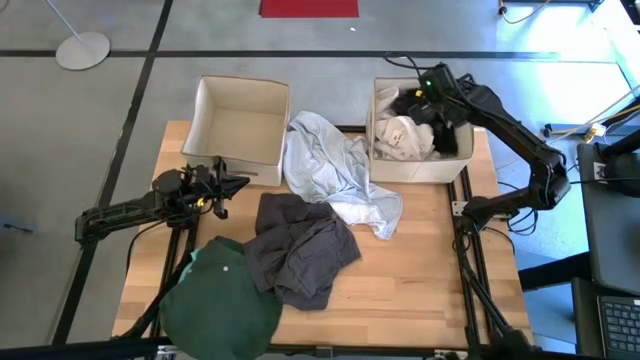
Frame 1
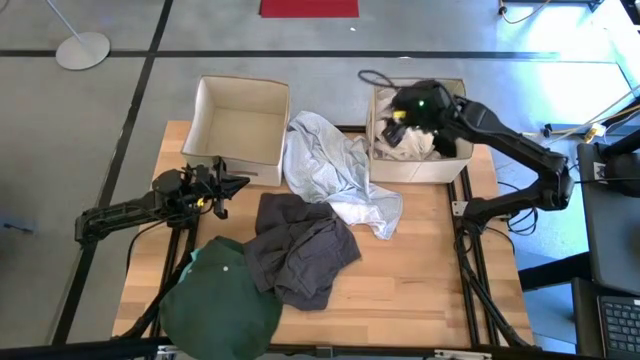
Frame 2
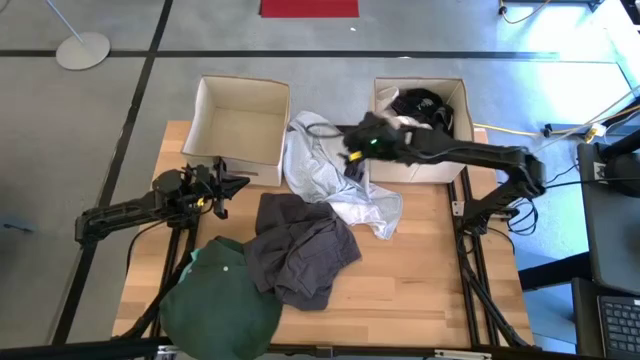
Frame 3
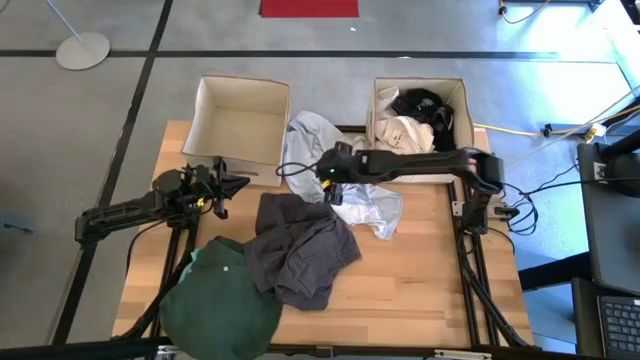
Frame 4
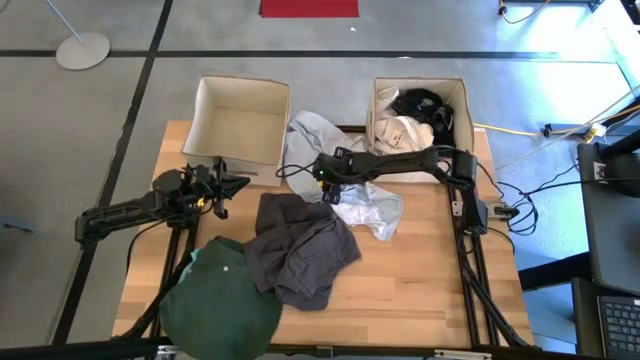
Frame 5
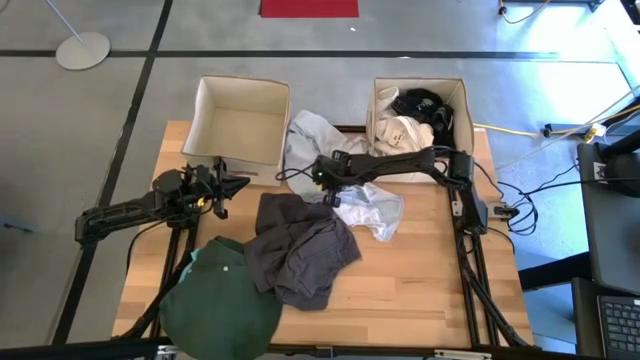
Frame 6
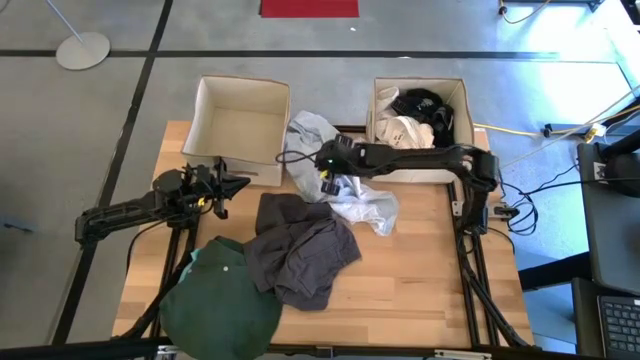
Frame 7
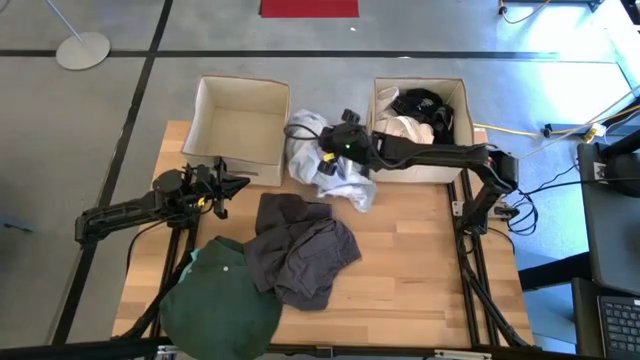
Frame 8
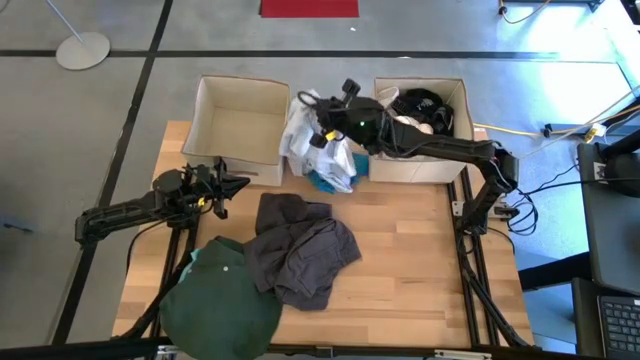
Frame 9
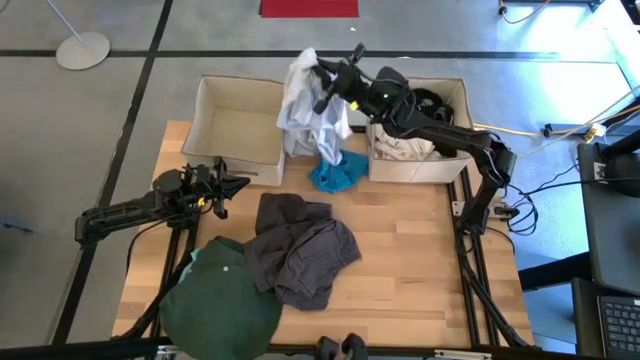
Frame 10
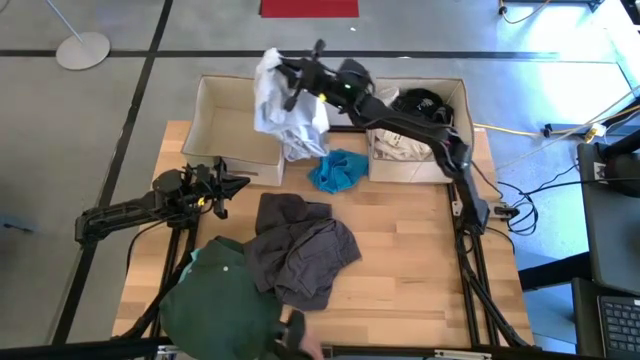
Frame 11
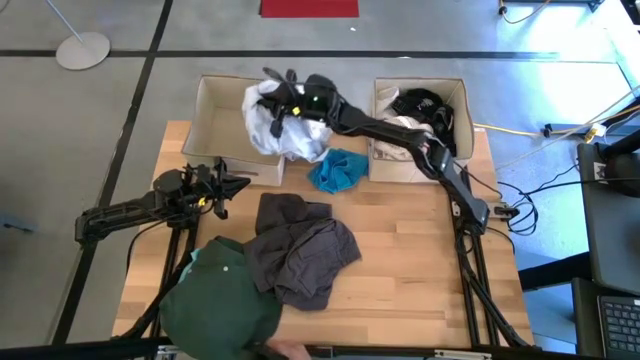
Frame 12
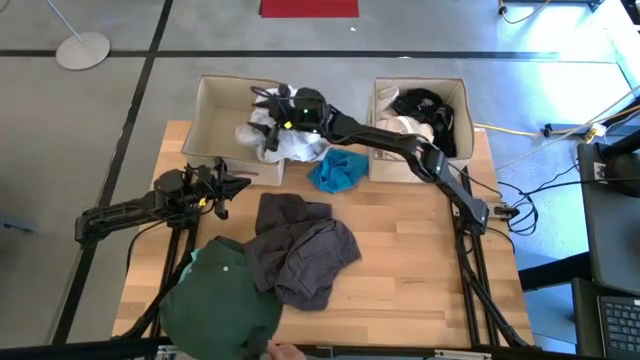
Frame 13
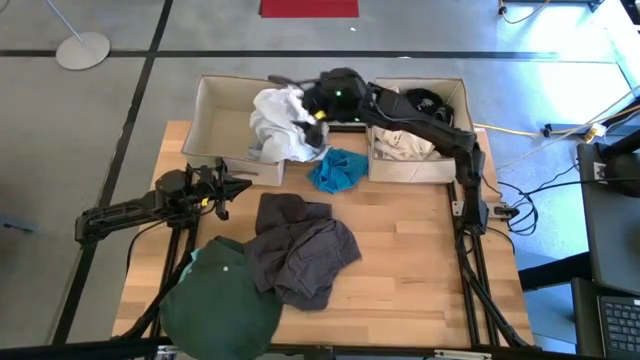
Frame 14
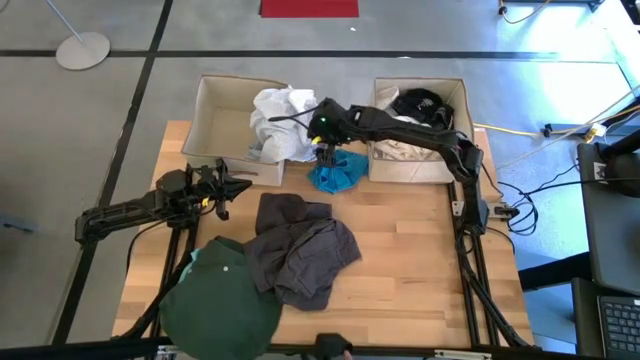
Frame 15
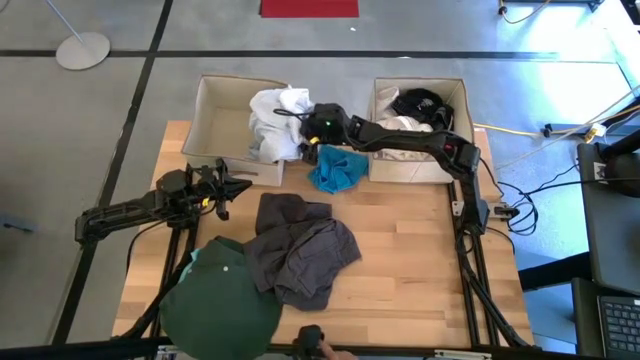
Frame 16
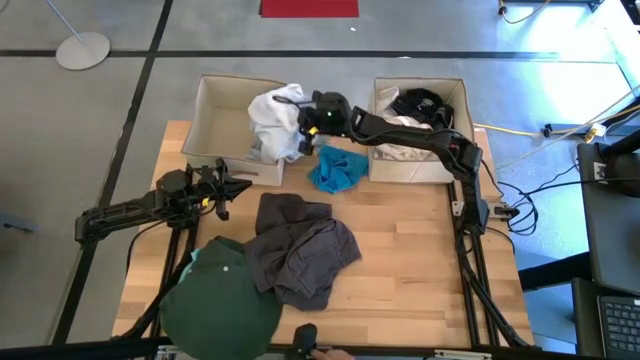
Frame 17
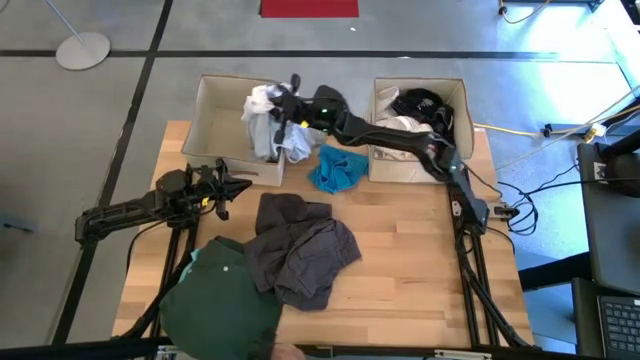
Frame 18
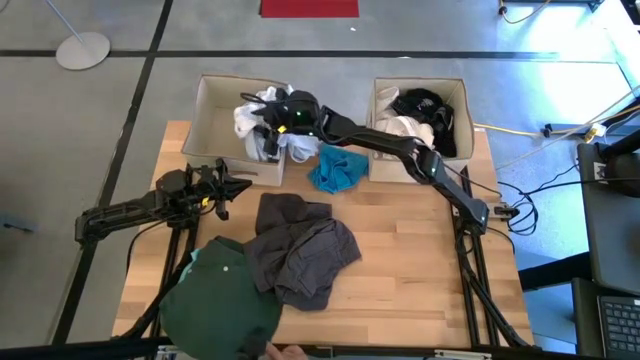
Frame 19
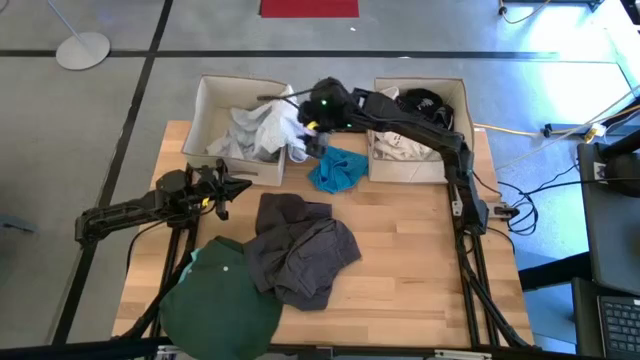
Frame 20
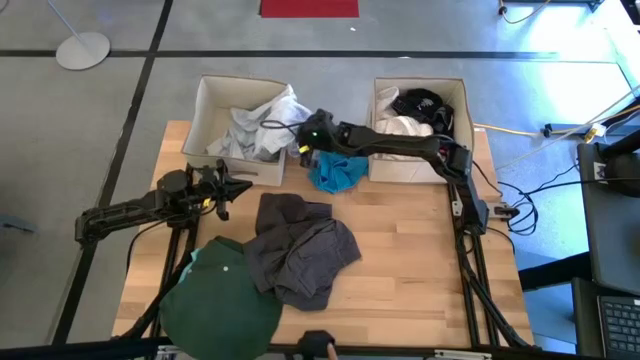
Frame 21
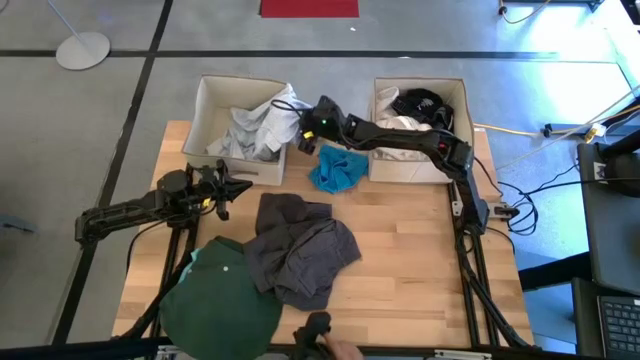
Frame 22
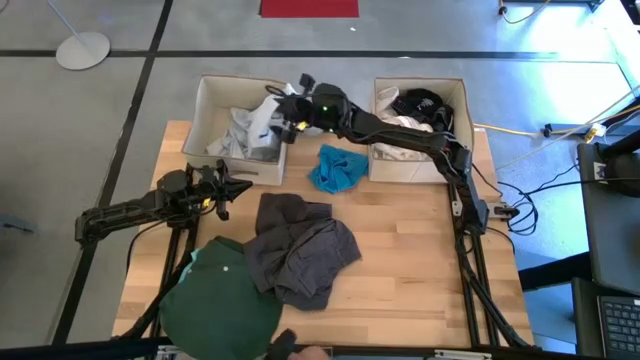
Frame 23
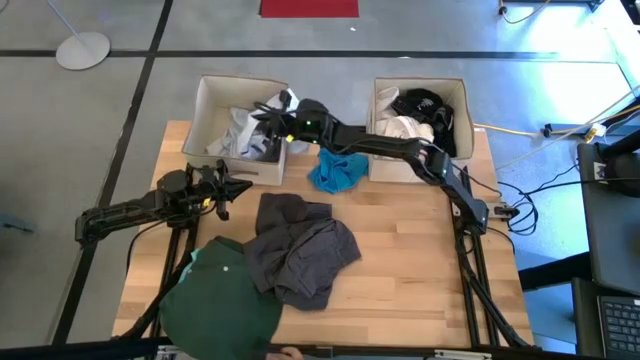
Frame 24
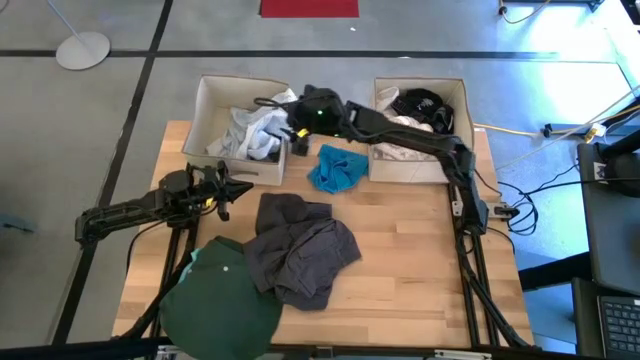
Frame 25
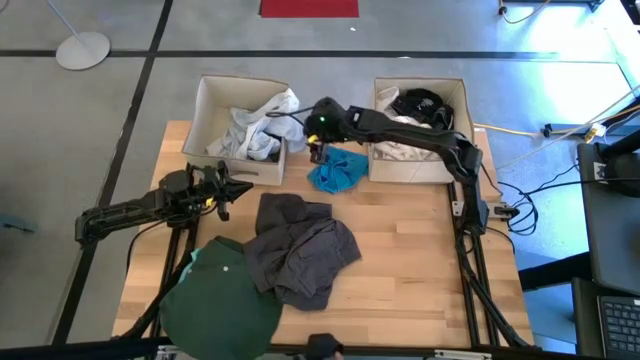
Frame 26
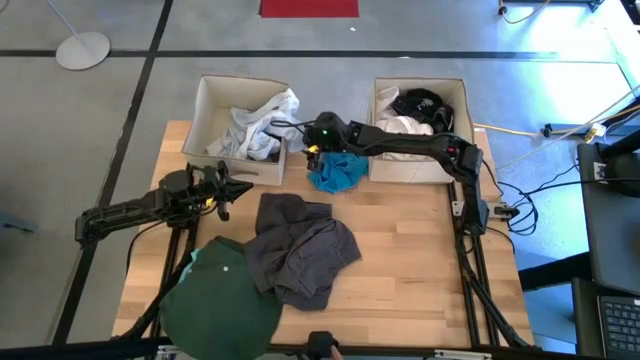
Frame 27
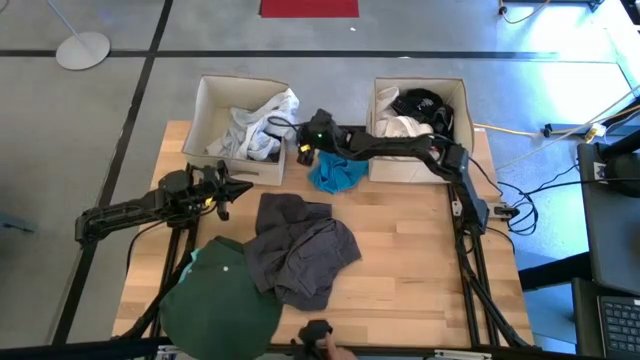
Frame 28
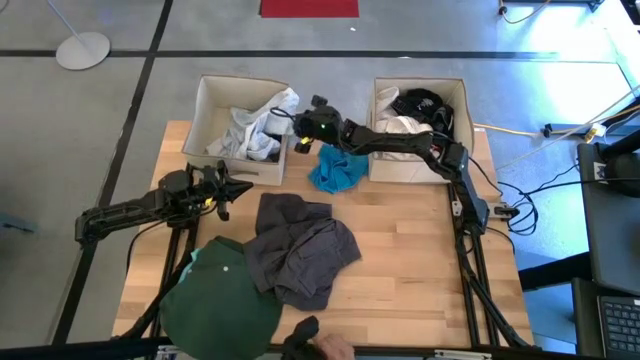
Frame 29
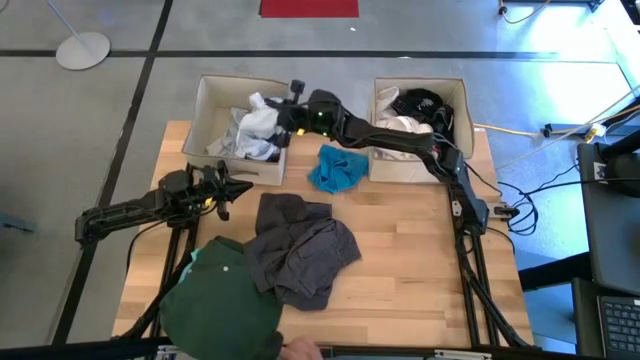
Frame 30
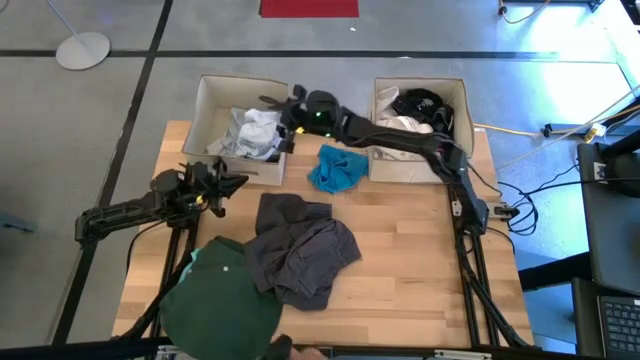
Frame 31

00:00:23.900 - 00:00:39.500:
Task: Sort clothes
Put the patterned white dress into the left laundry bin

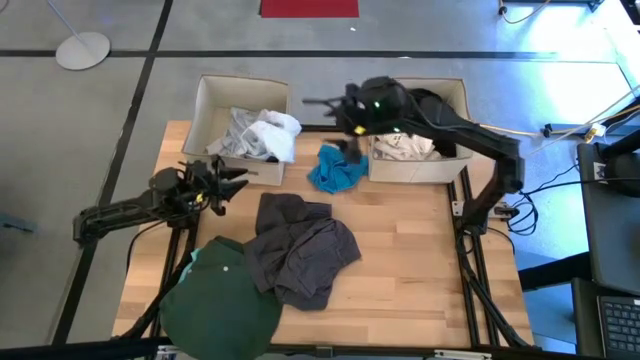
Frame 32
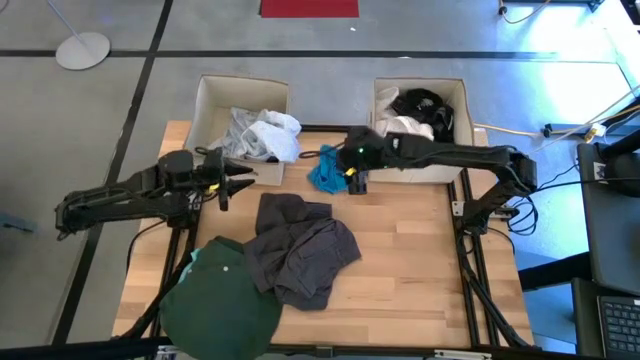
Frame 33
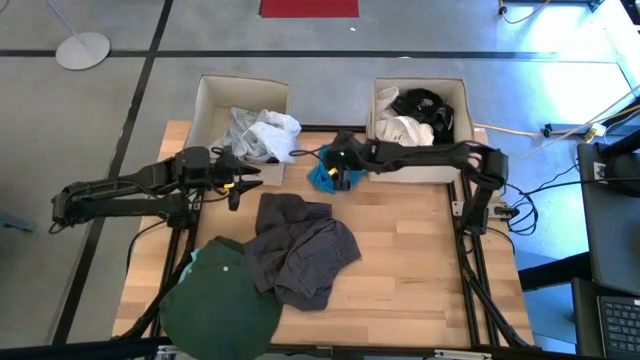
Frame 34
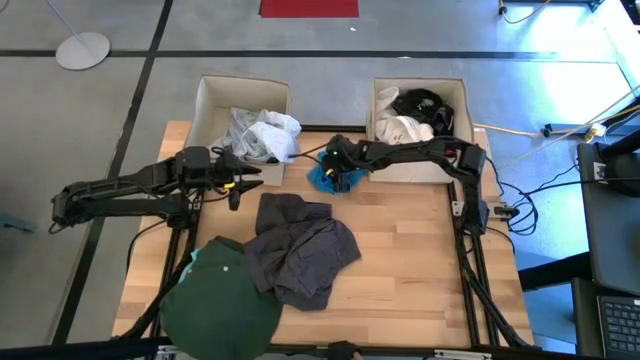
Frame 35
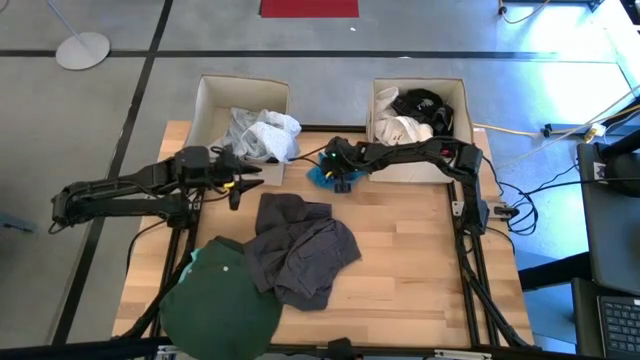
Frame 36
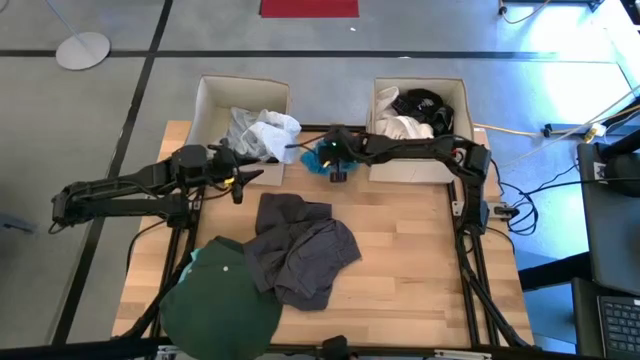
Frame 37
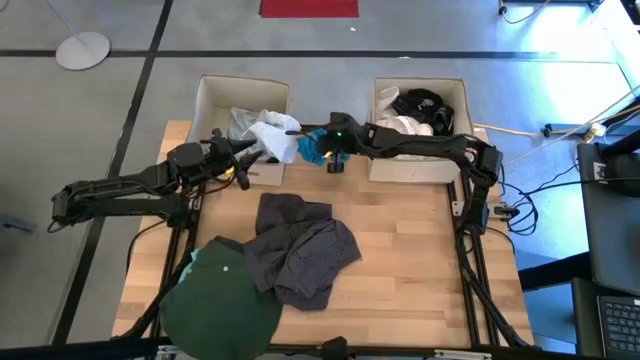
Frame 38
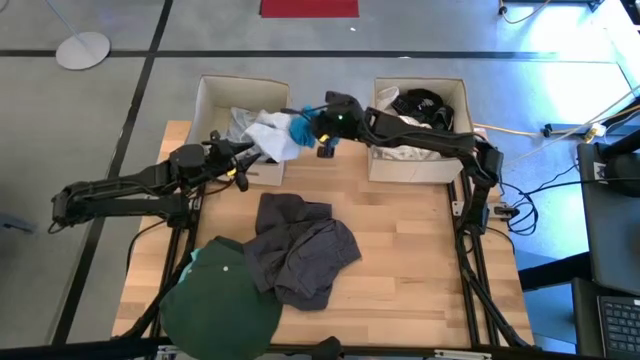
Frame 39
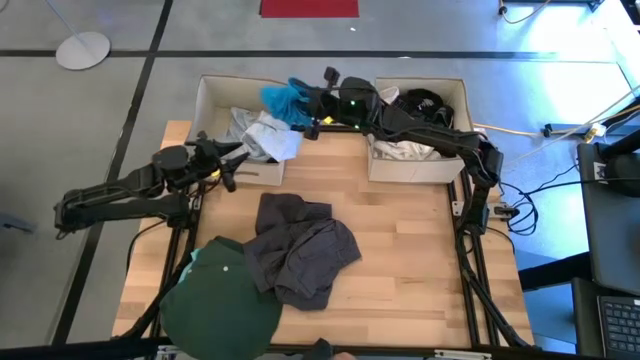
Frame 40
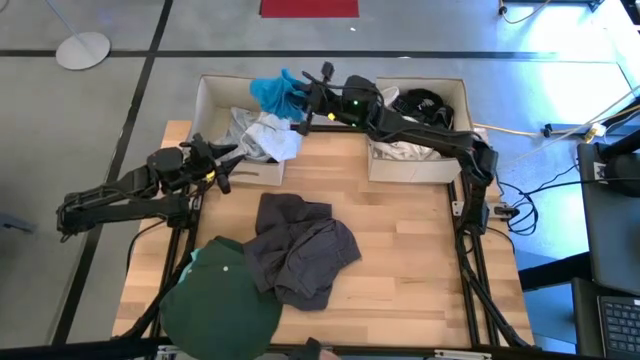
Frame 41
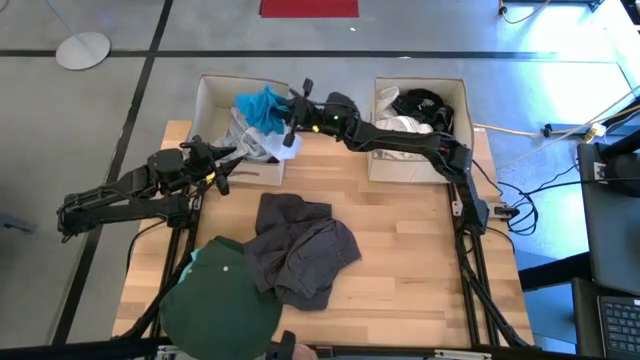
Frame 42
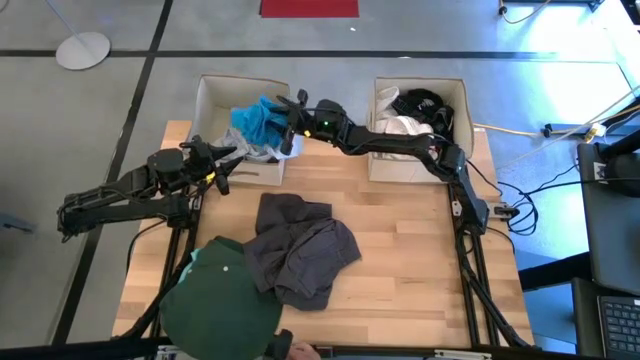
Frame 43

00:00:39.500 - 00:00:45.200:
Put the blue shorts into the left laundry bin
